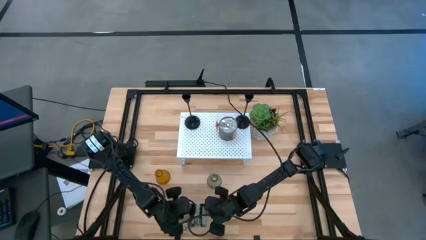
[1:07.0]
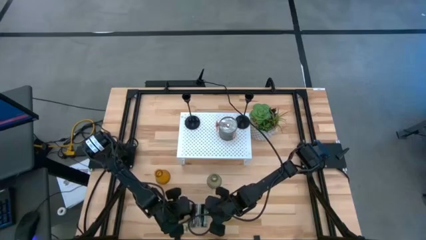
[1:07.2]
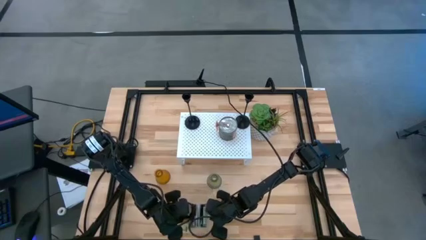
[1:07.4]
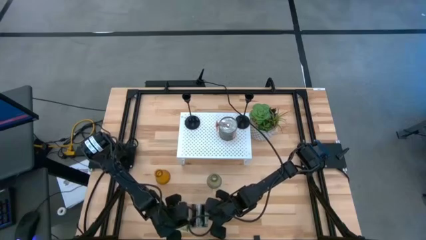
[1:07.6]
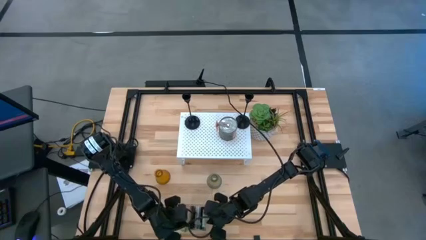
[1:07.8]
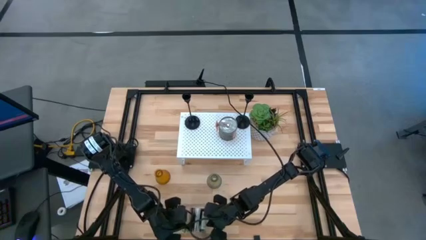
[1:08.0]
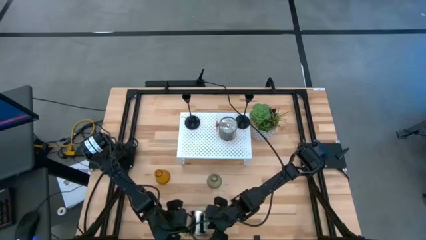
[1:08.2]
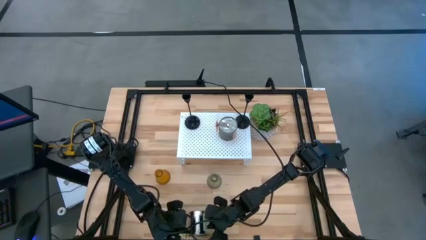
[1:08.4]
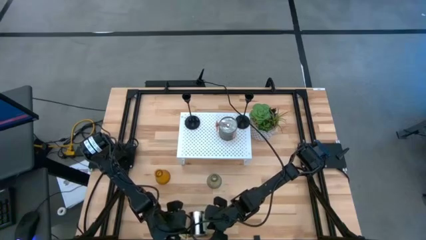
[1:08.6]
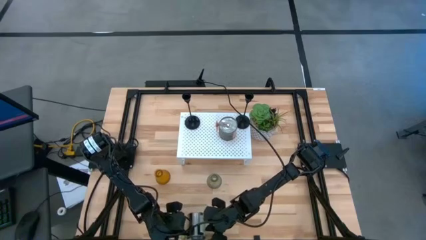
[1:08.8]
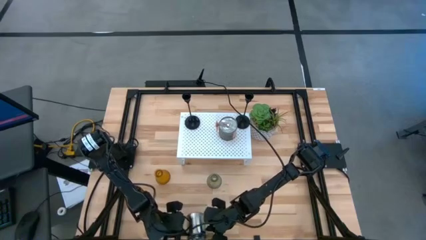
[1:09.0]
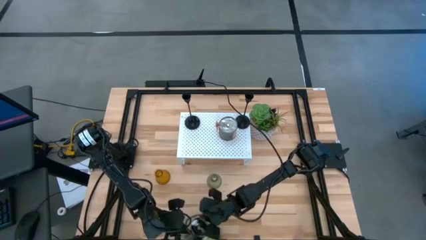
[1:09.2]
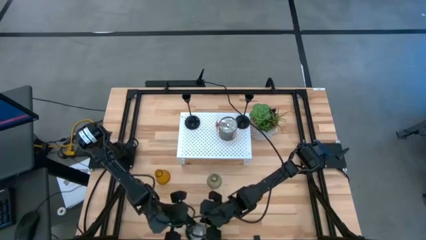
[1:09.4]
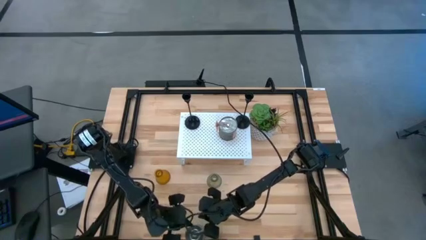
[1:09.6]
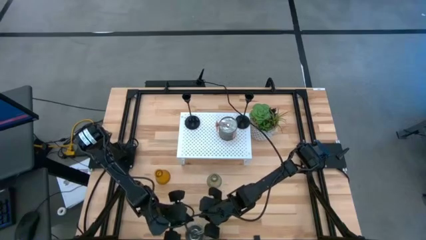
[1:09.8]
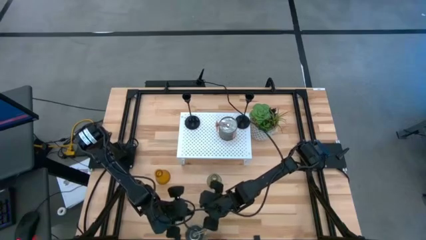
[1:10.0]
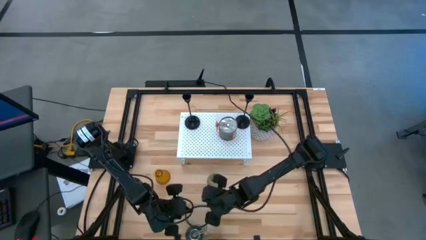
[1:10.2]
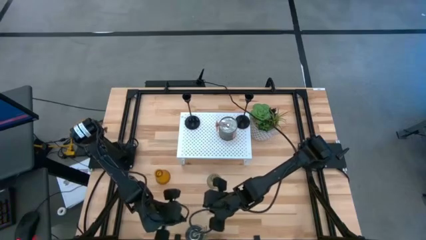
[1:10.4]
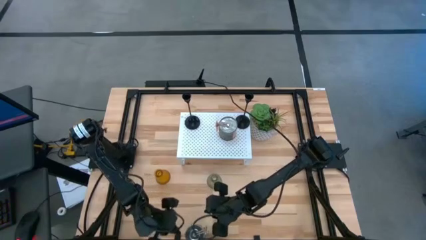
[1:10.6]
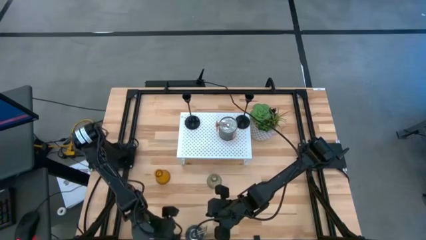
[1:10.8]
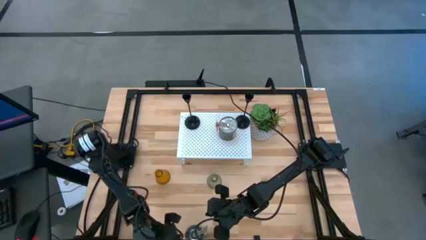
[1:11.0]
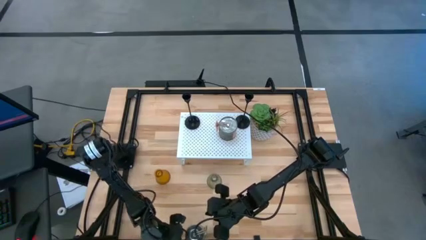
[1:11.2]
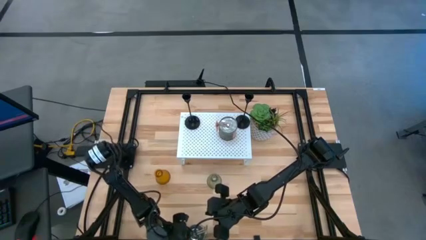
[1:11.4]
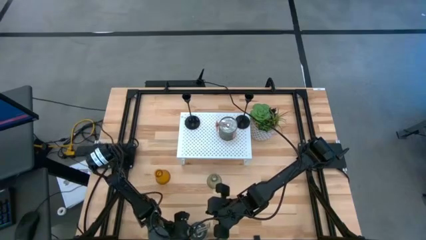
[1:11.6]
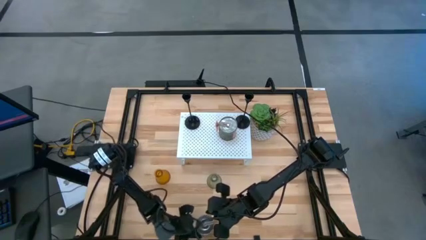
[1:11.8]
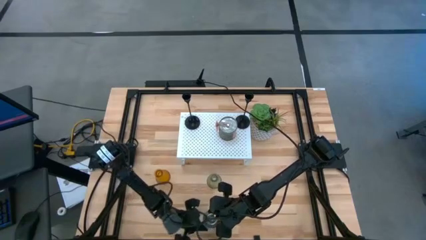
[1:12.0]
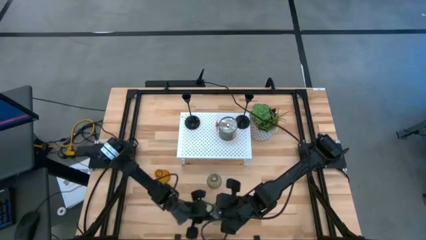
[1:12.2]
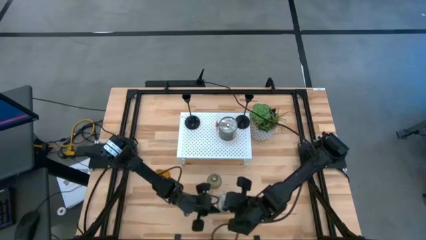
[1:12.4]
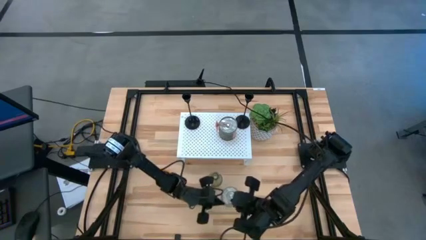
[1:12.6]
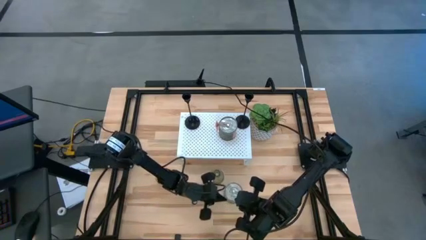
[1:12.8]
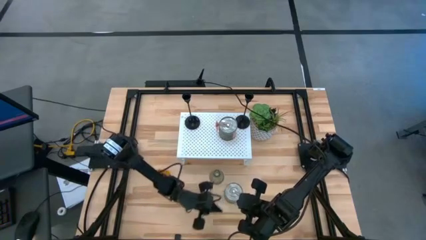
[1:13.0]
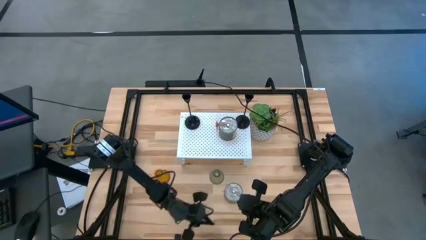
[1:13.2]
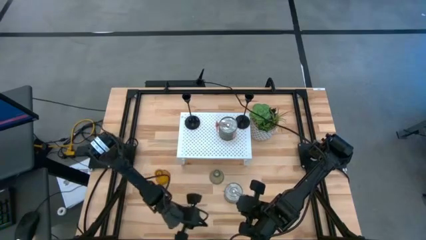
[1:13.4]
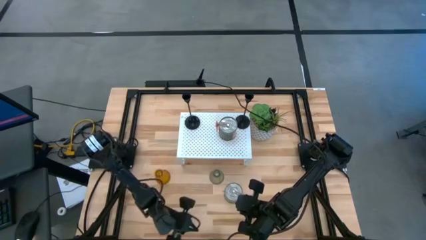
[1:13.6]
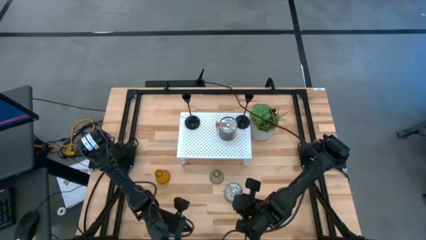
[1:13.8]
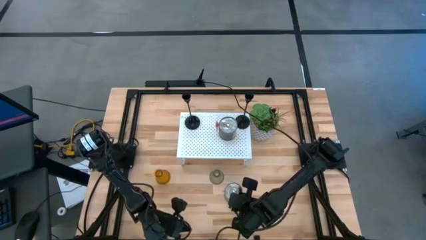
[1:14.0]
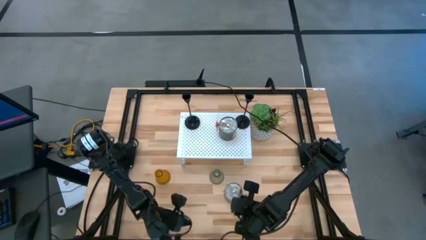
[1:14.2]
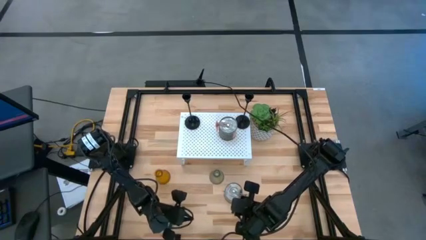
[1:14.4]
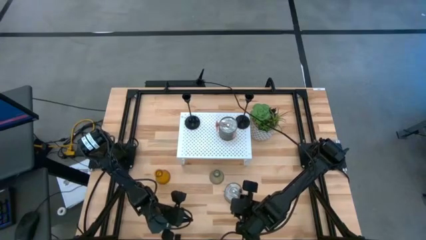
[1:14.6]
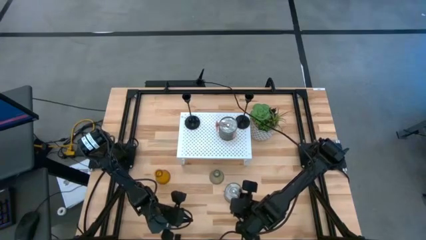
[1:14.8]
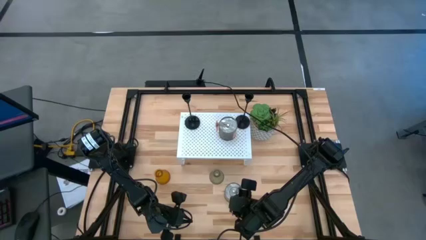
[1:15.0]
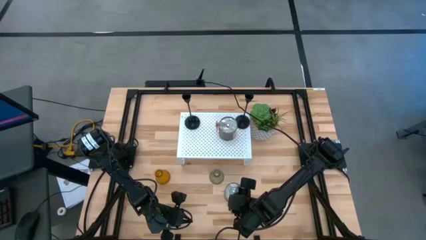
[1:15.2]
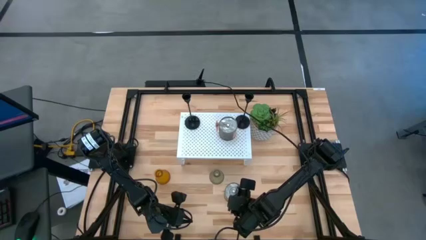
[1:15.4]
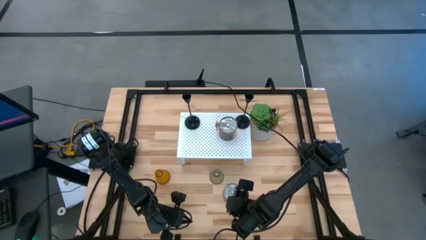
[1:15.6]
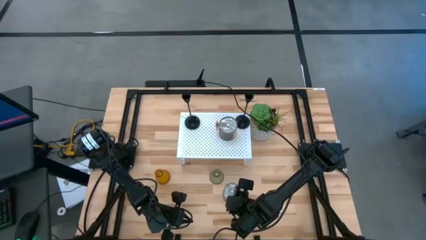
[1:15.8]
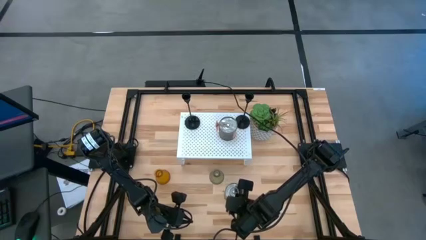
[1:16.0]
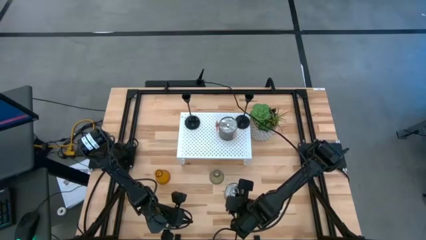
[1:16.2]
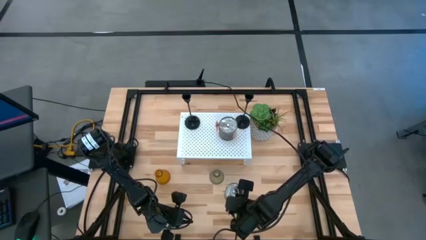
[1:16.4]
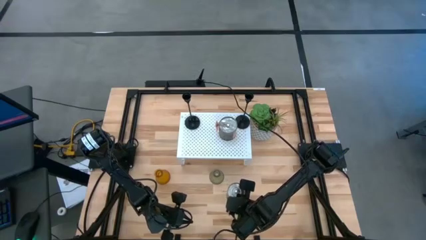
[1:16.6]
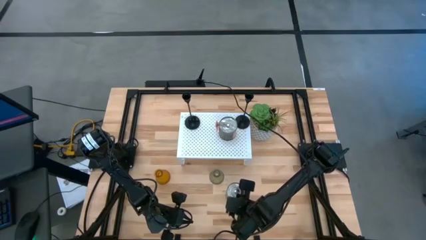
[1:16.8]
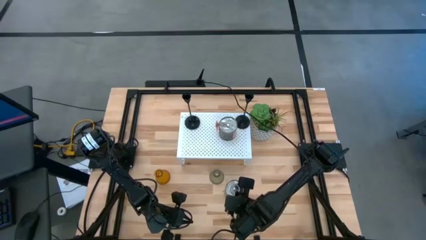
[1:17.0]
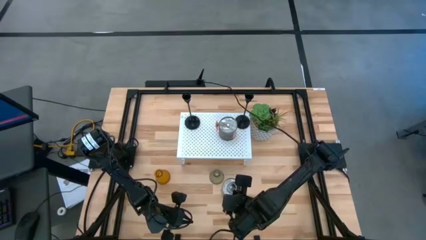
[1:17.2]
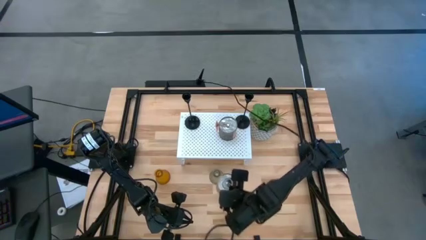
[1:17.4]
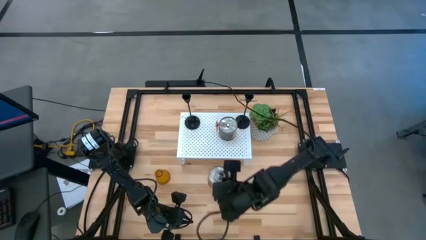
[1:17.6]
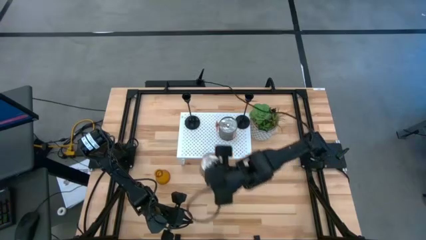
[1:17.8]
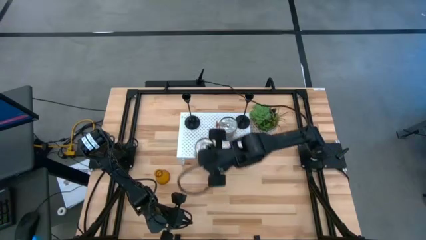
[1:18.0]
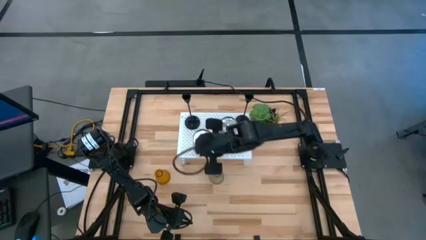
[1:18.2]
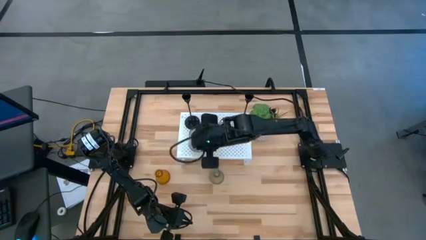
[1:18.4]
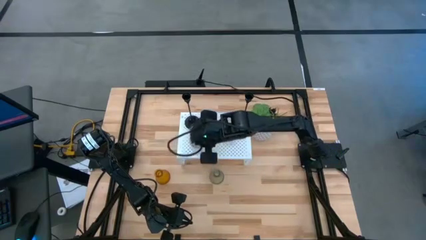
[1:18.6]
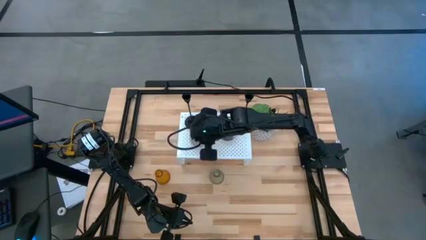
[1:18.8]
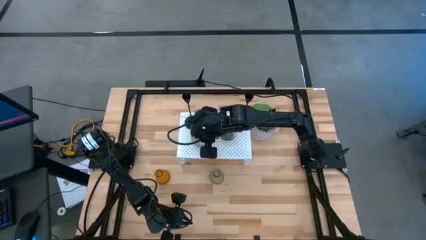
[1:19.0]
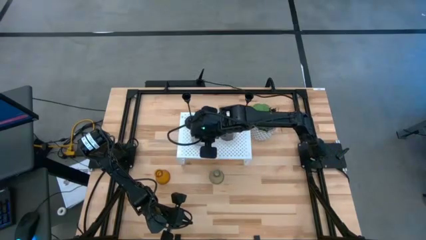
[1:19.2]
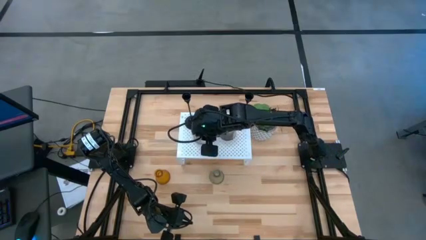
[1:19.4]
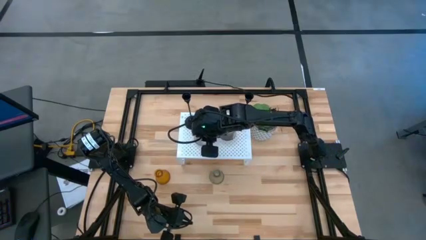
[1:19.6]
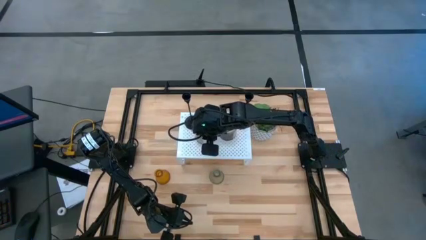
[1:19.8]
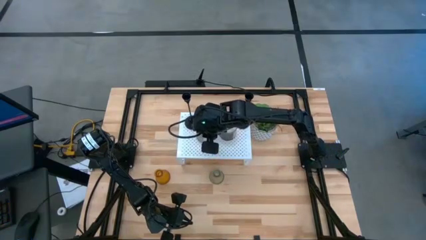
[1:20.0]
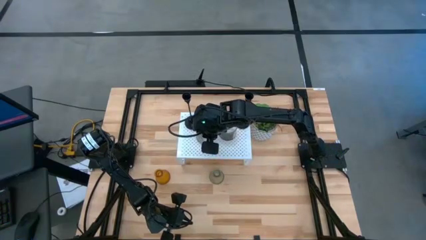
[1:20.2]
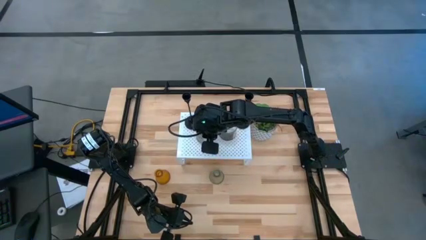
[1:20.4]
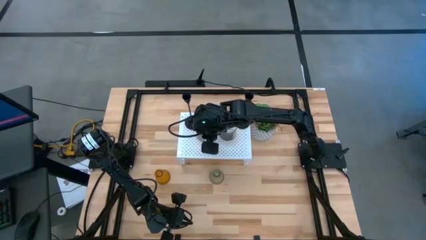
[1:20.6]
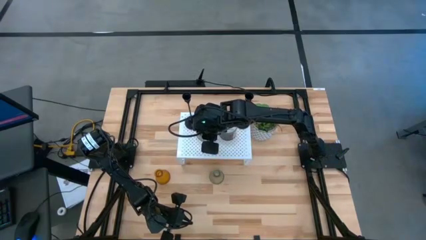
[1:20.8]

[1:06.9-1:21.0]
Task: Pick & Place candle stick holders
Put the green scented candle on the shelf
